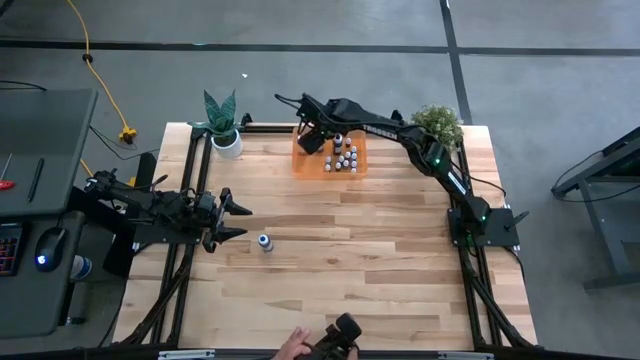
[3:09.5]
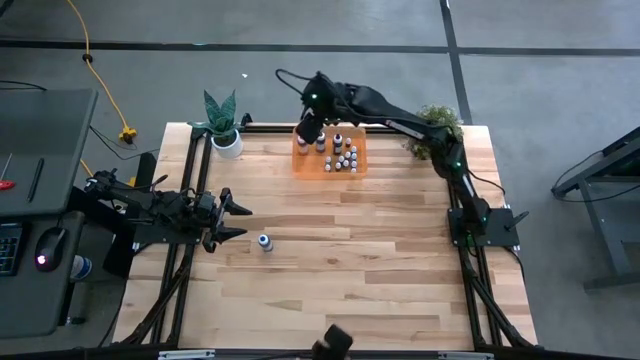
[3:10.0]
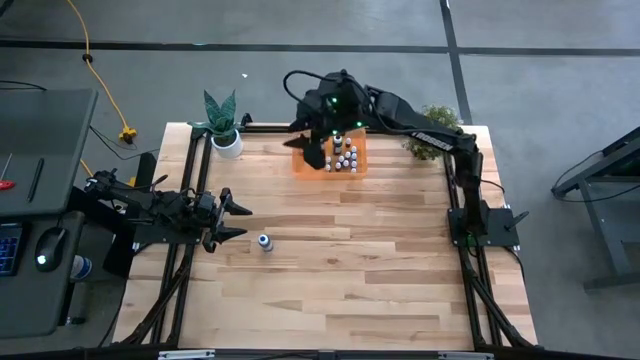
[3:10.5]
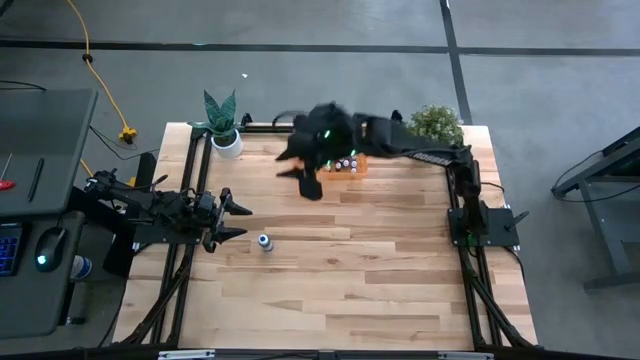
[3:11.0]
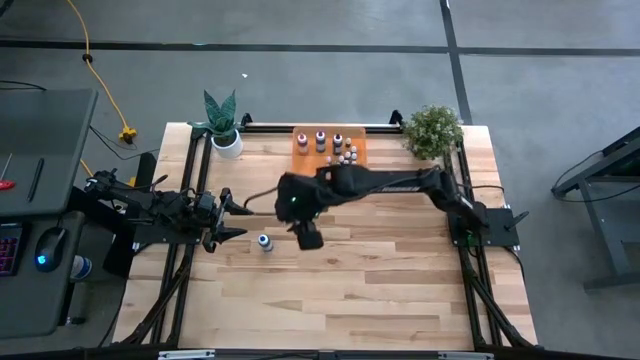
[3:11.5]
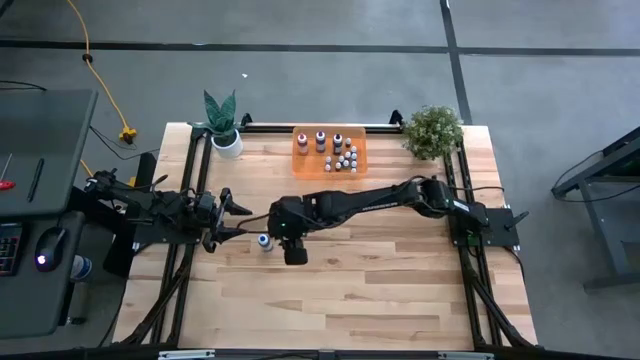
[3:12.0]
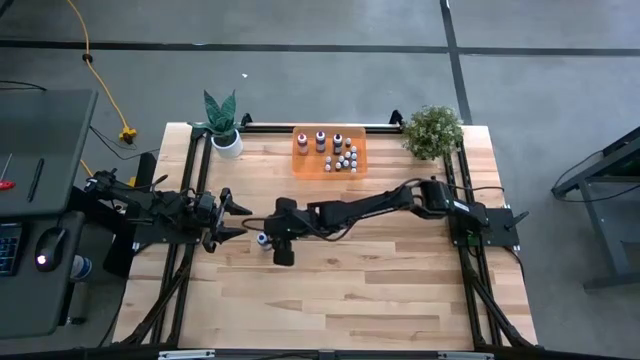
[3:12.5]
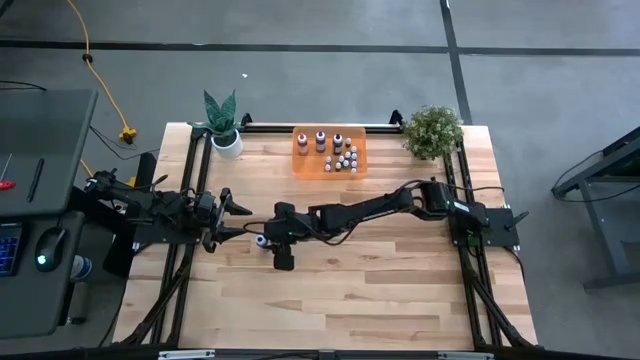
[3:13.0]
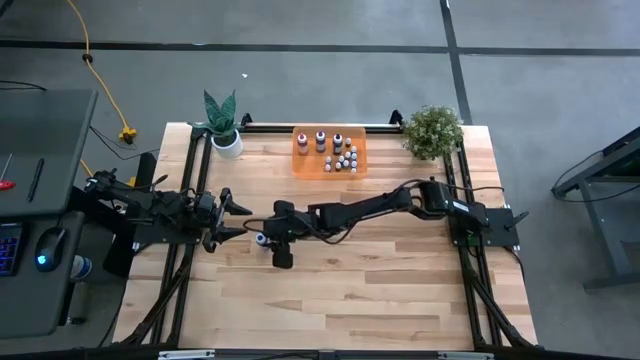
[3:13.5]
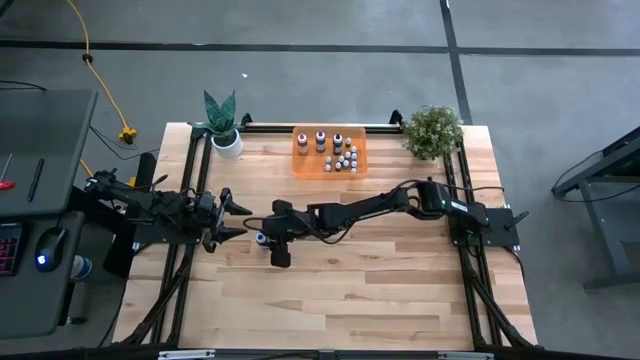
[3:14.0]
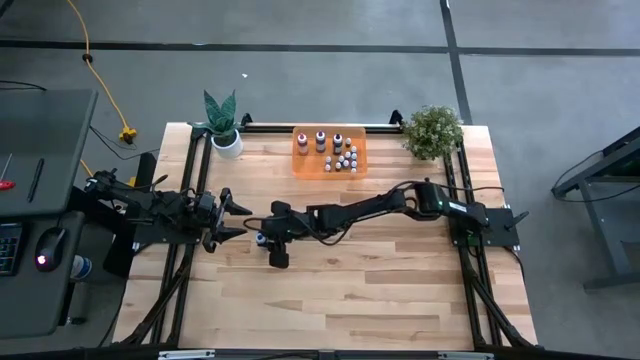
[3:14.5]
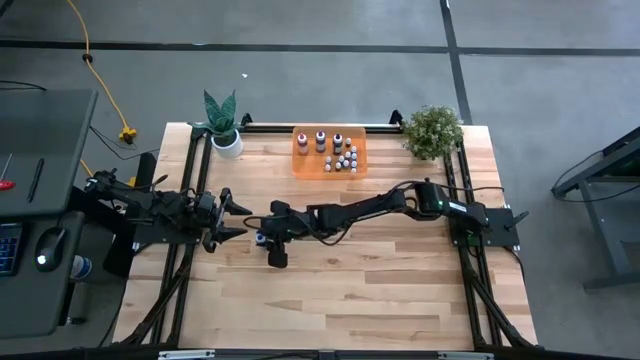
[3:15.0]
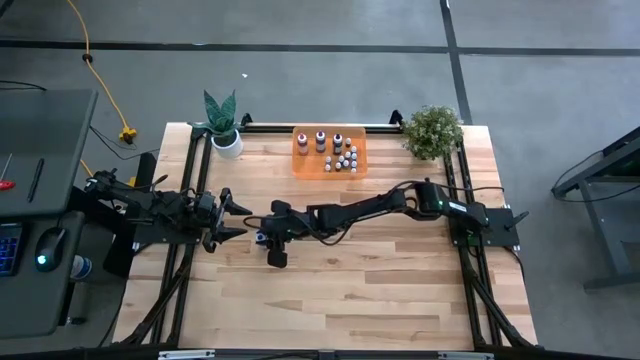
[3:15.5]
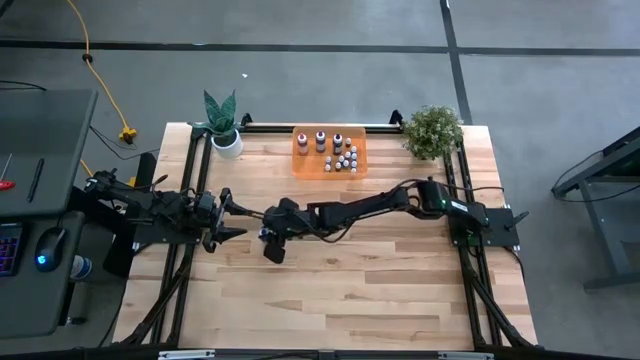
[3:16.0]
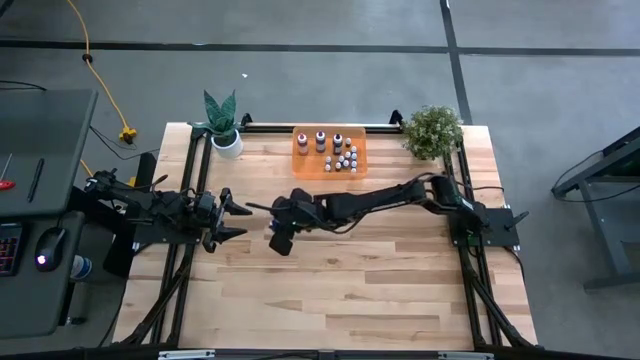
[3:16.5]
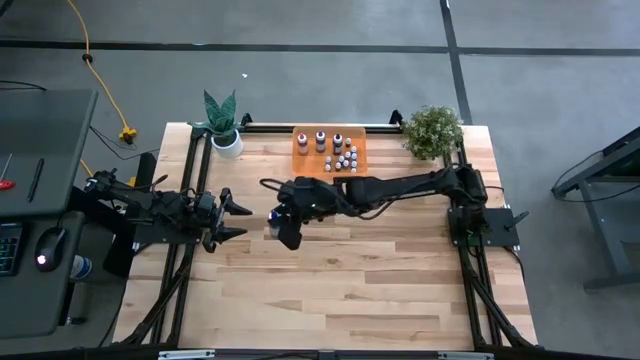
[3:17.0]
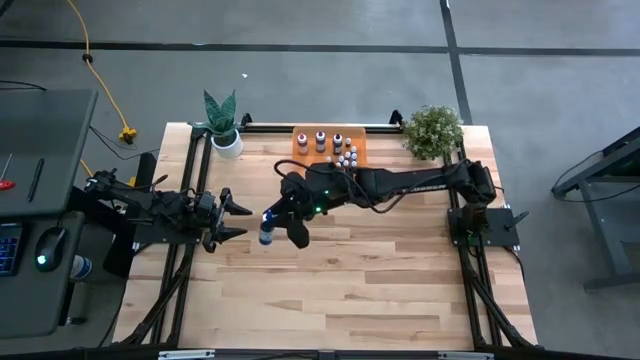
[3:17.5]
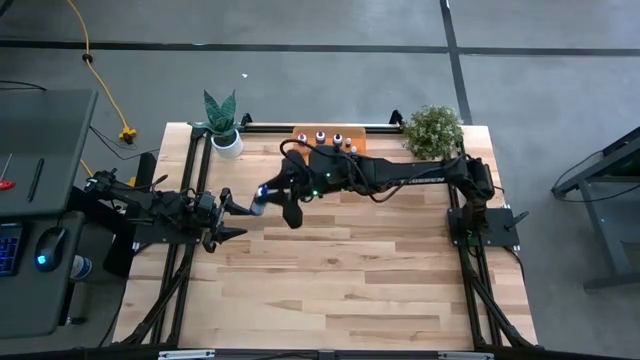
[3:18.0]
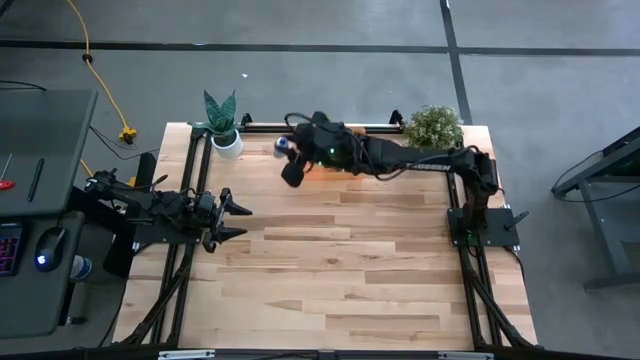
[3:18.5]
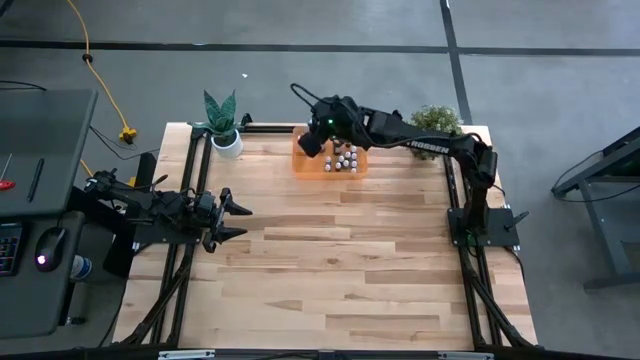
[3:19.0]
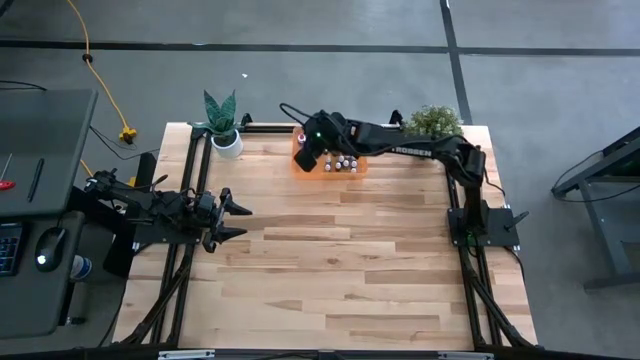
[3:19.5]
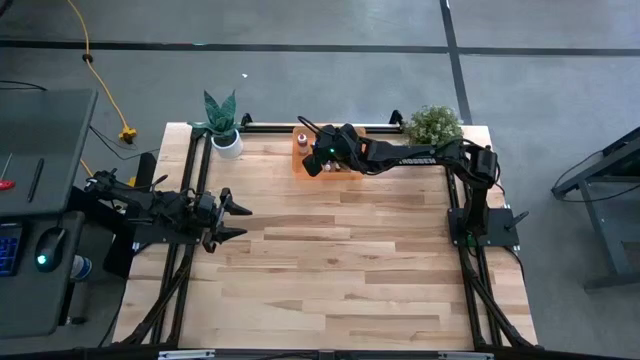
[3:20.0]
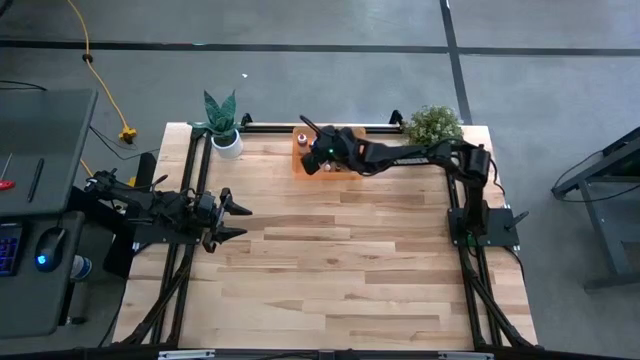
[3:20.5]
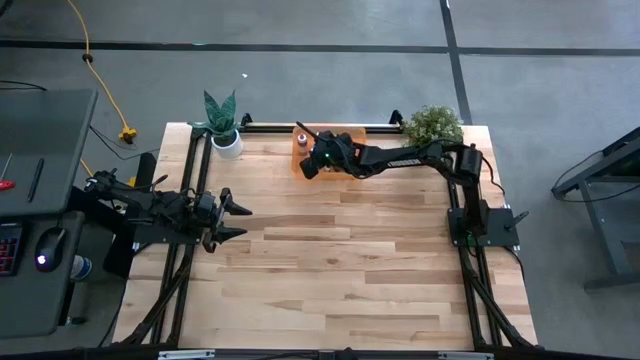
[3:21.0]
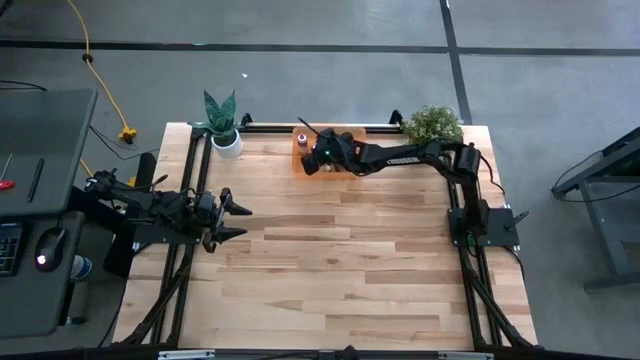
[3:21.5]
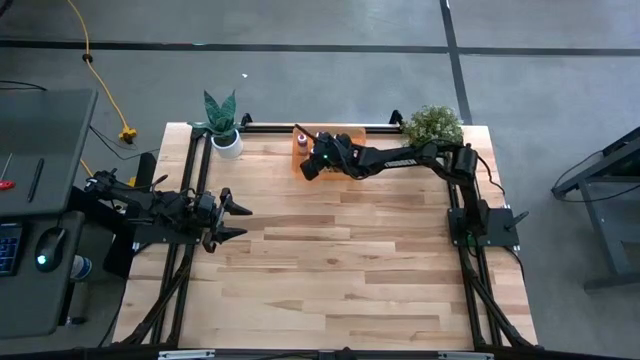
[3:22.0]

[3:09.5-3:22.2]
Task: Pick & Place food coloring
Put the big blue food coloring bottle into the orange bin

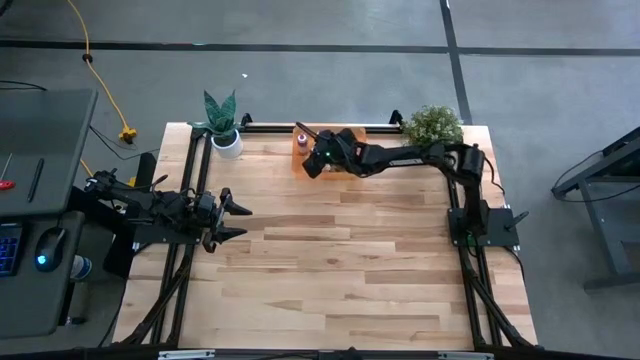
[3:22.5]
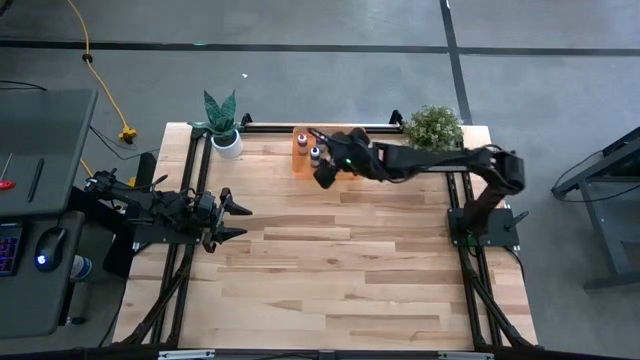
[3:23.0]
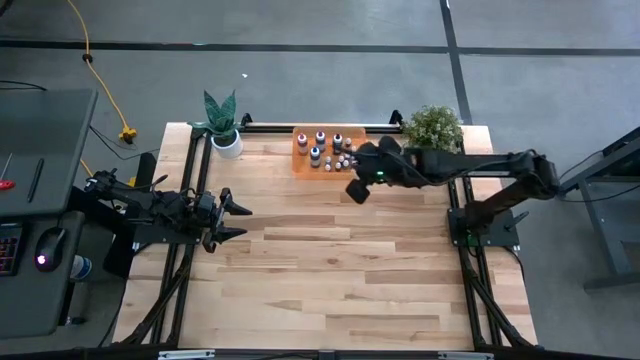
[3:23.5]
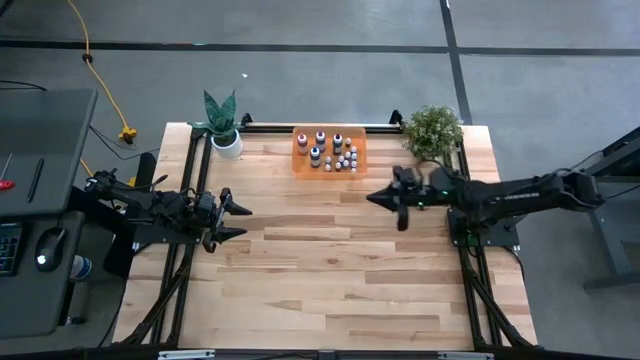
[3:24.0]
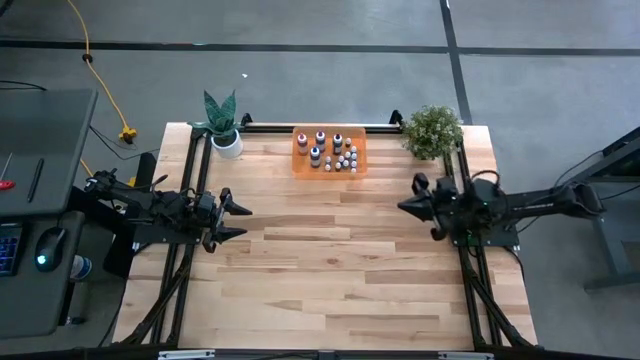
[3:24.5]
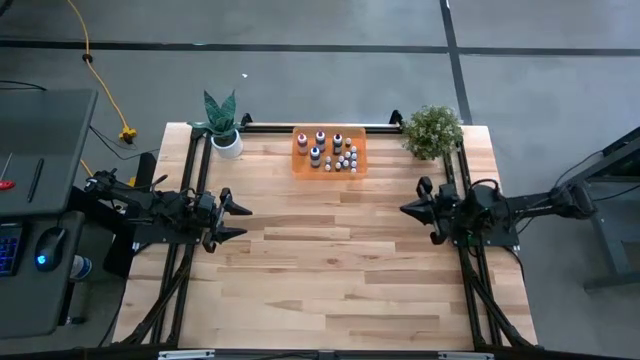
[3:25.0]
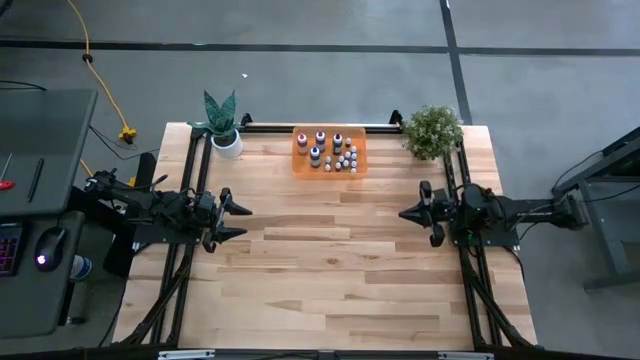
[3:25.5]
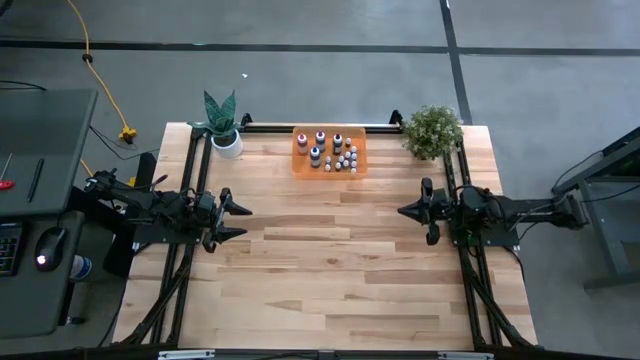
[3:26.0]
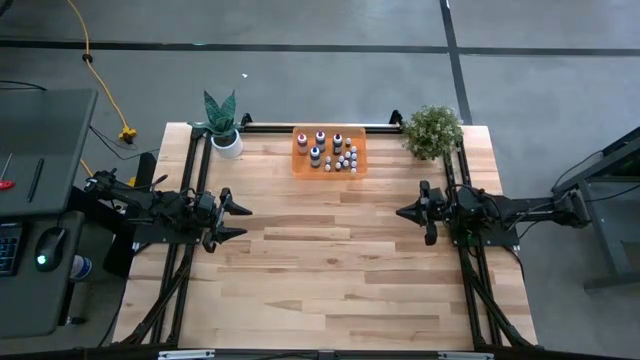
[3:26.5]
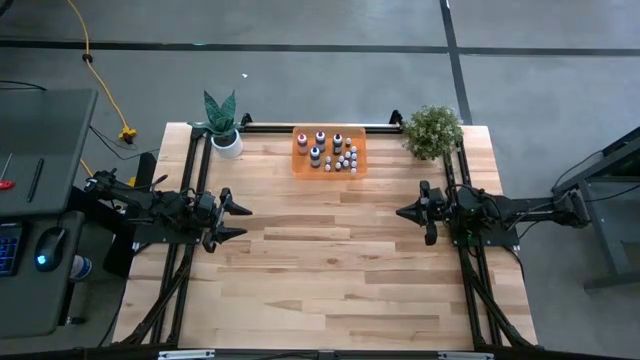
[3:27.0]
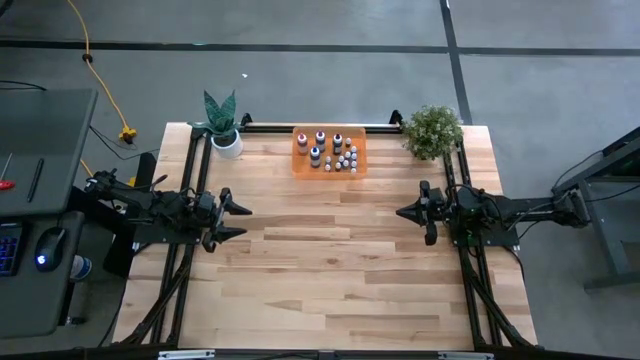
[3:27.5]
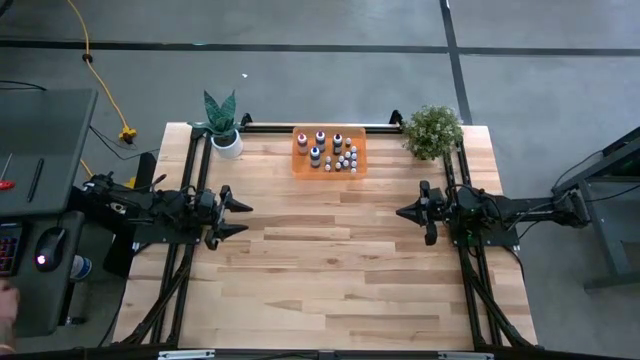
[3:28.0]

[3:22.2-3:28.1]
Return to Home Position

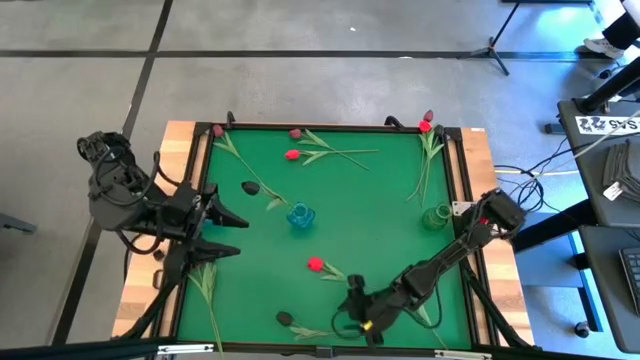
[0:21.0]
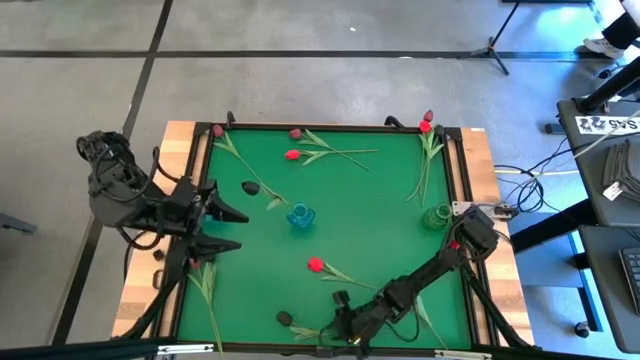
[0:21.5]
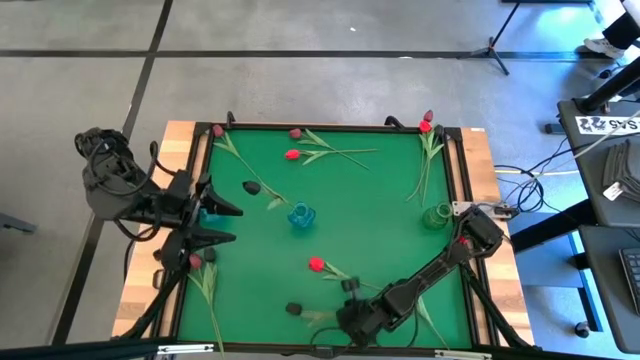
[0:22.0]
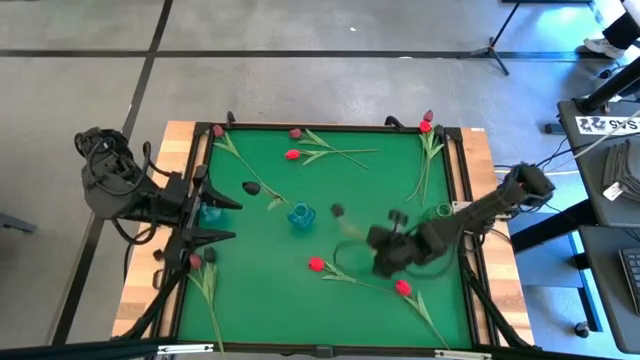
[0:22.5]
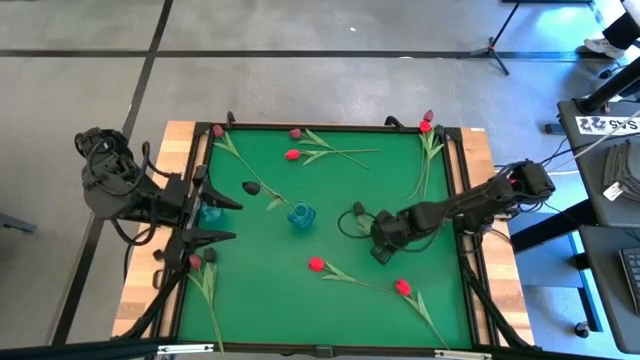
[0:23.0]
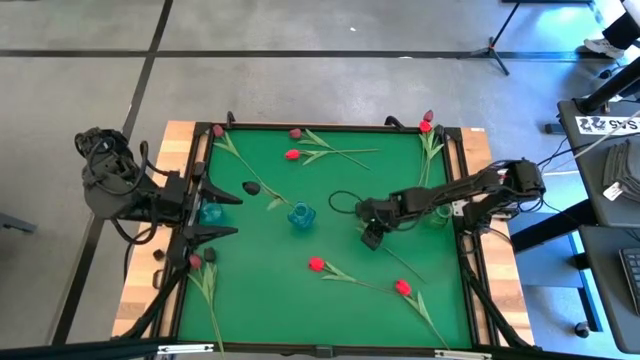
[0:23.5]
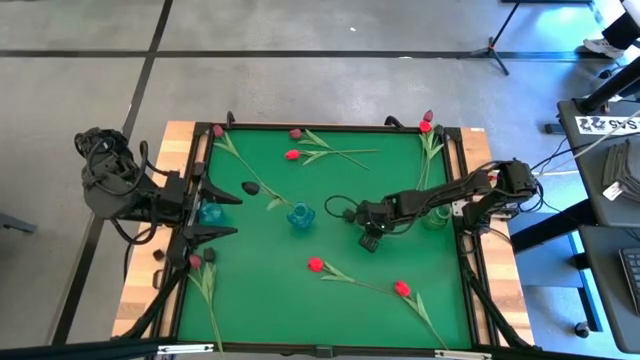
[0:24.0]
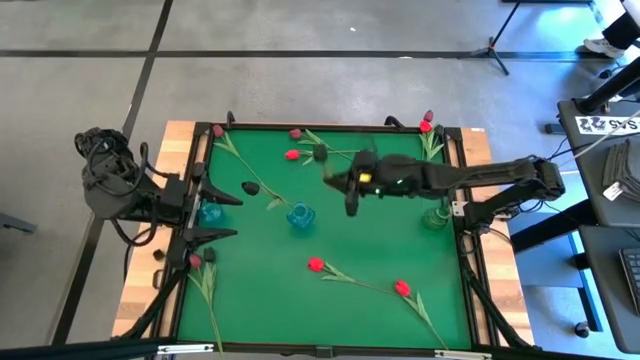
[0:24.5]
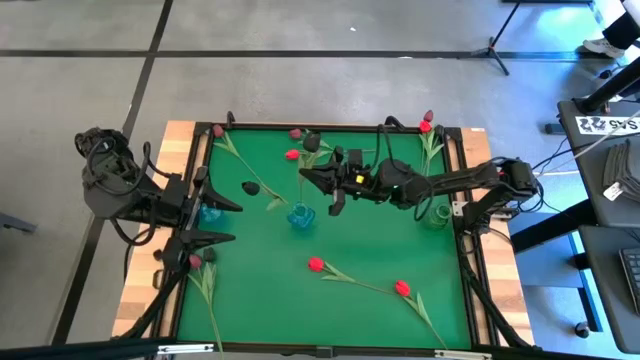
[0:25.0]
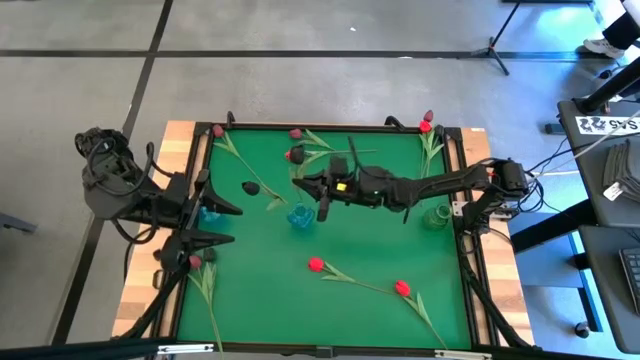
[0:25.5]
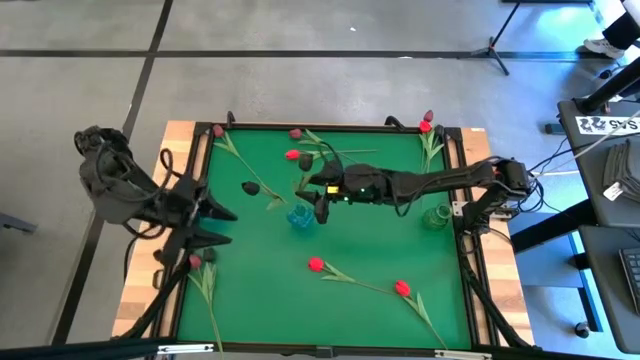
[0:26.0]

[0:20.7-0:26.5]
Task: Sort flowers into vase by color
Put the right black tulip into the right blue vase
